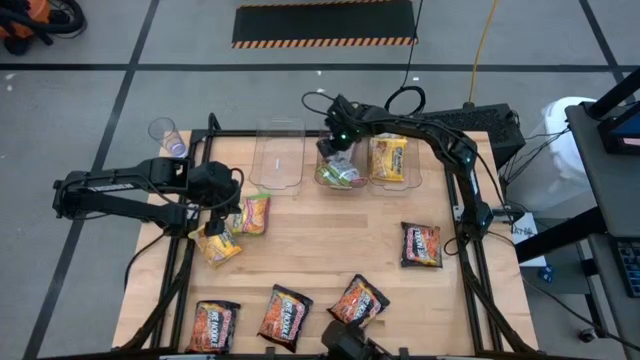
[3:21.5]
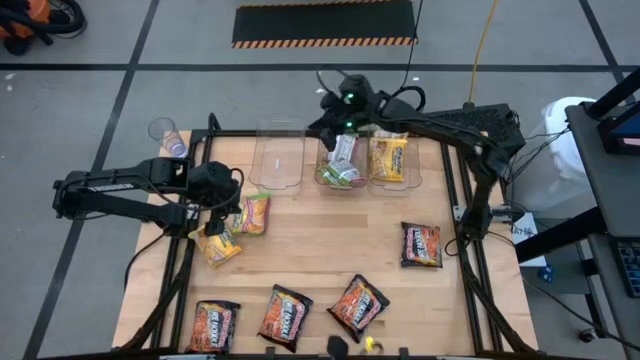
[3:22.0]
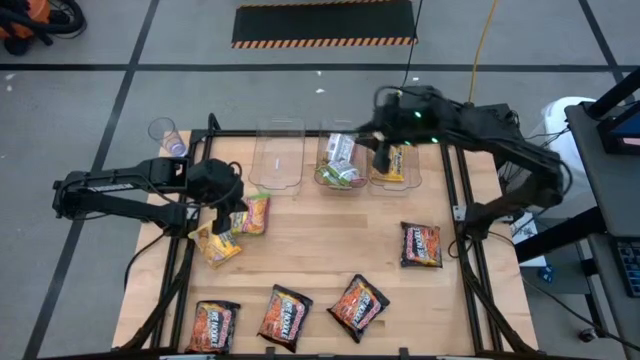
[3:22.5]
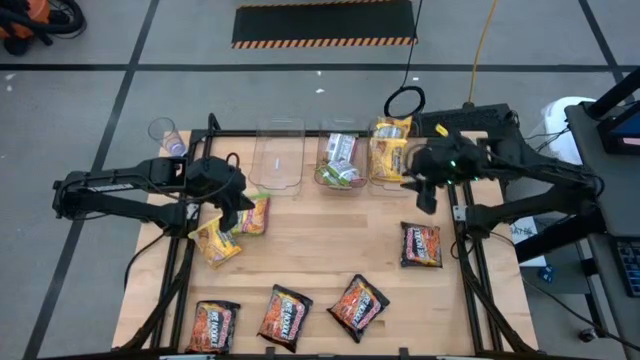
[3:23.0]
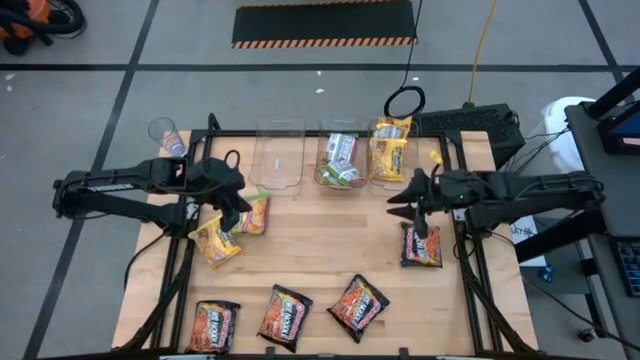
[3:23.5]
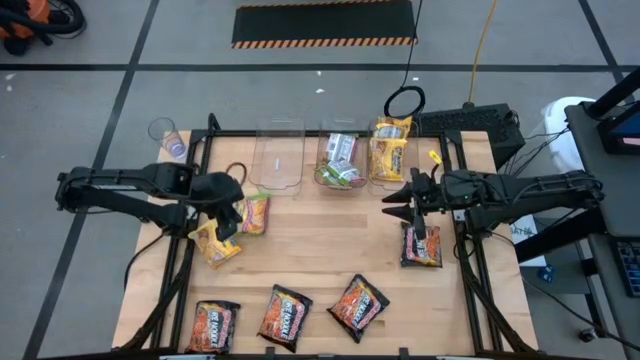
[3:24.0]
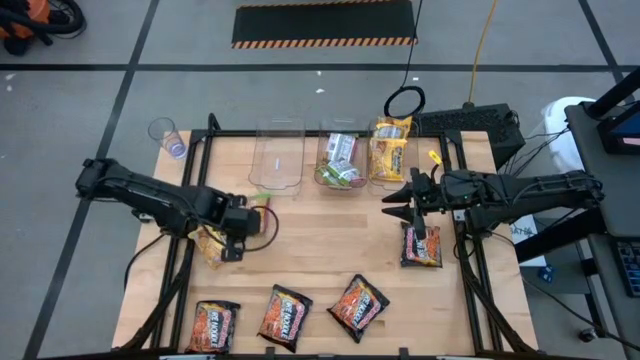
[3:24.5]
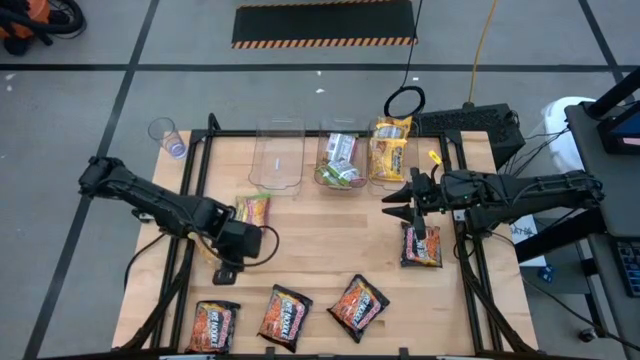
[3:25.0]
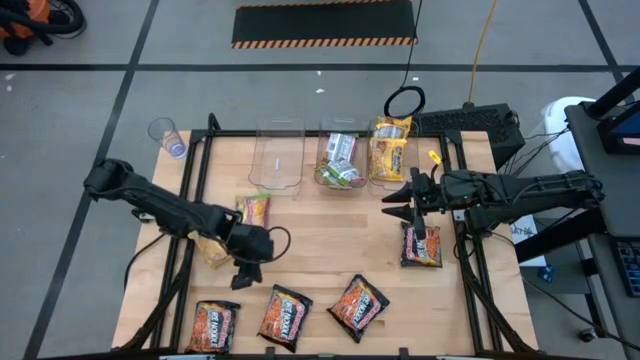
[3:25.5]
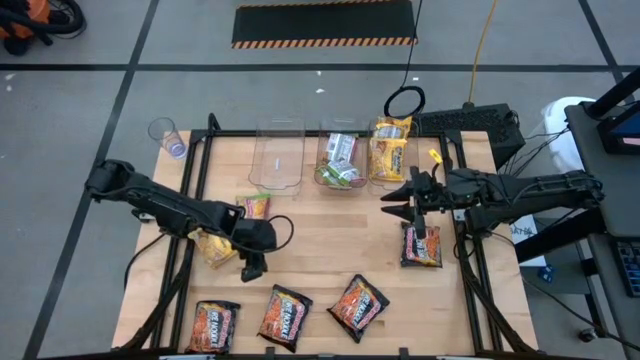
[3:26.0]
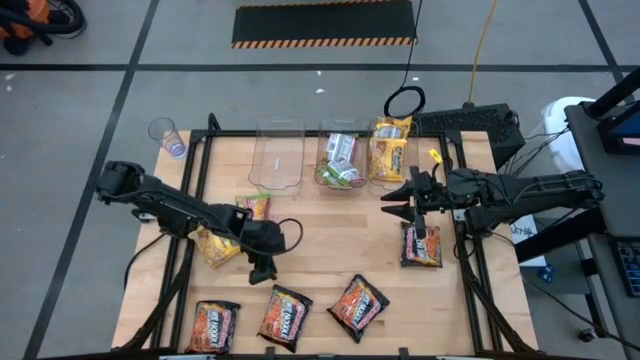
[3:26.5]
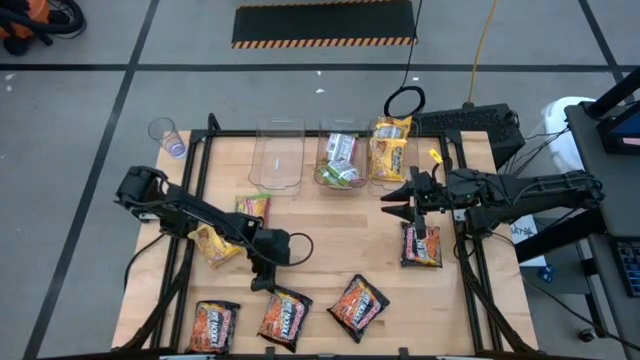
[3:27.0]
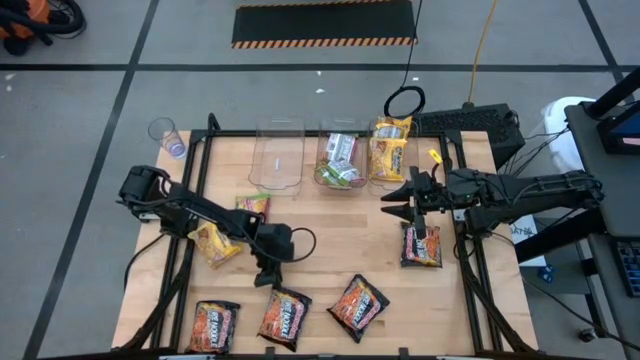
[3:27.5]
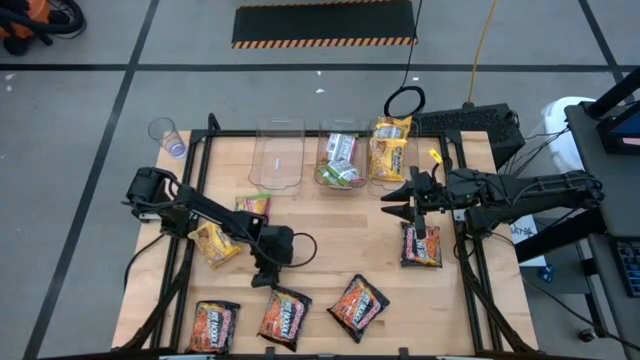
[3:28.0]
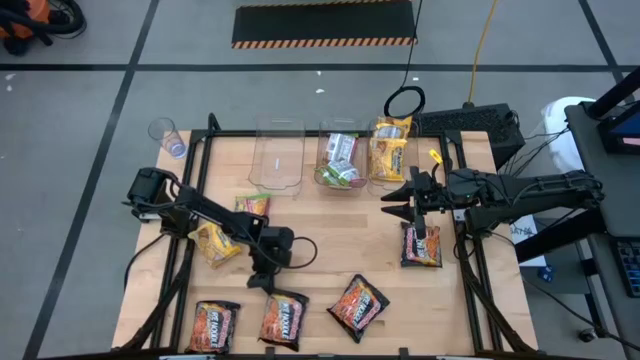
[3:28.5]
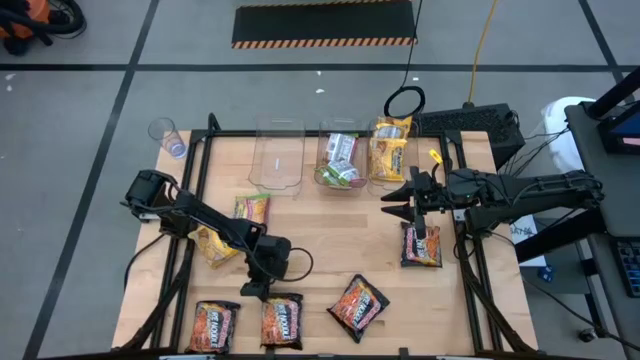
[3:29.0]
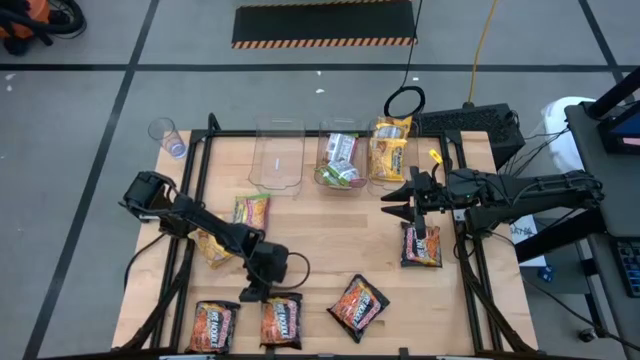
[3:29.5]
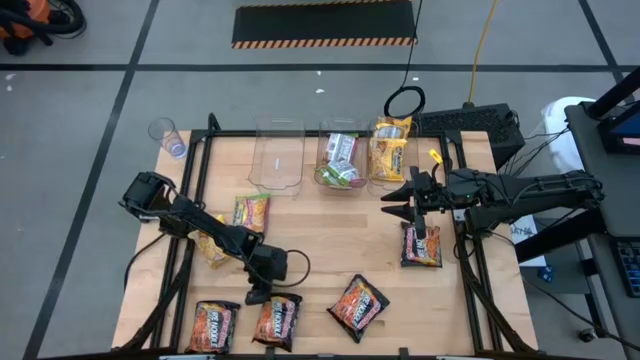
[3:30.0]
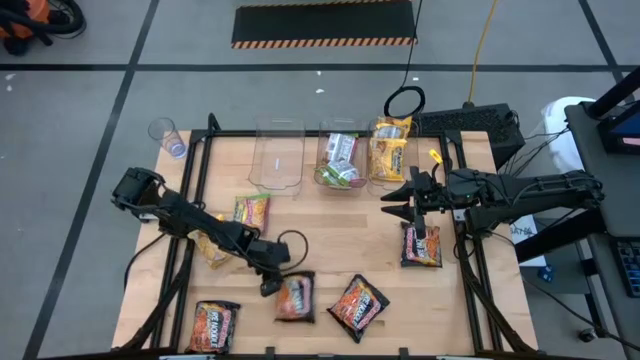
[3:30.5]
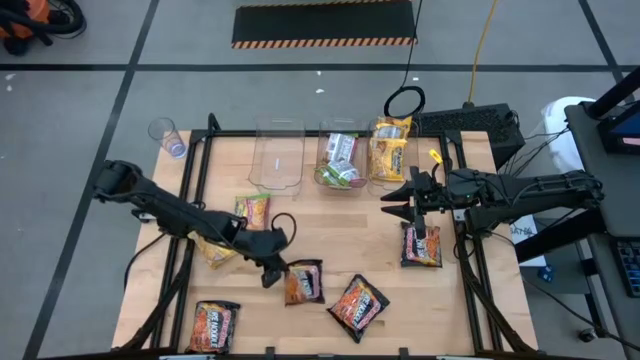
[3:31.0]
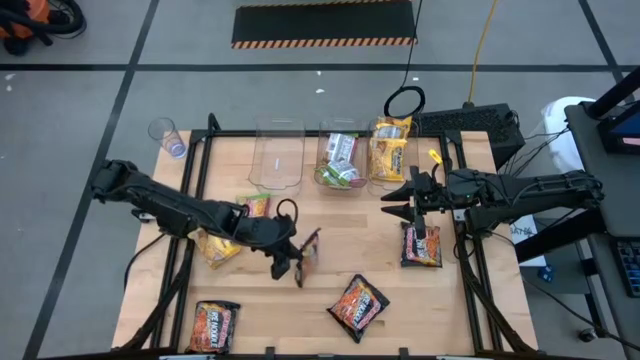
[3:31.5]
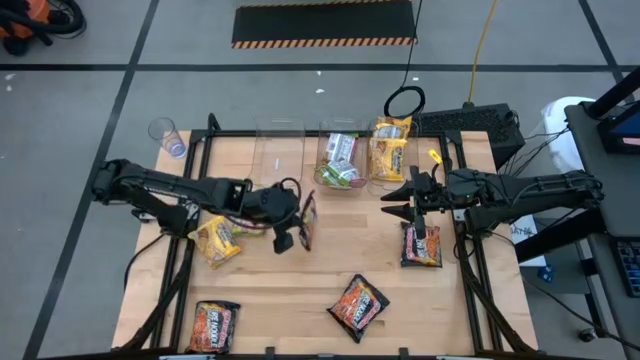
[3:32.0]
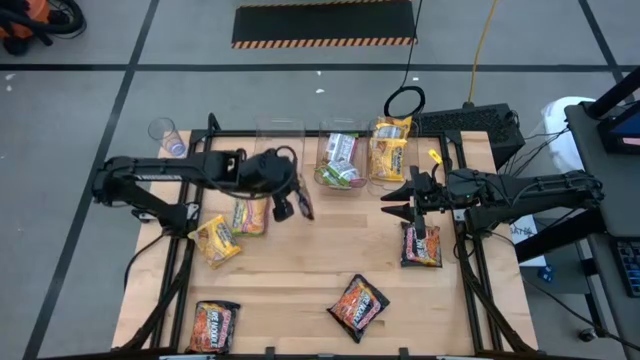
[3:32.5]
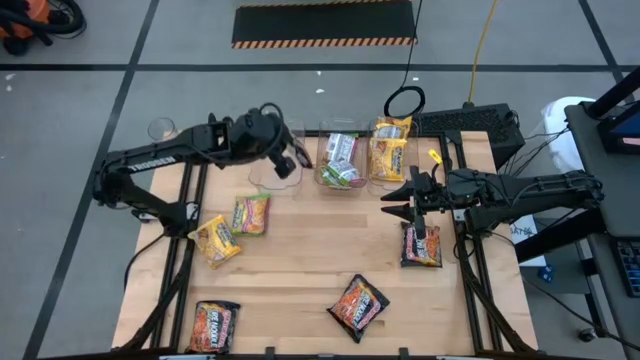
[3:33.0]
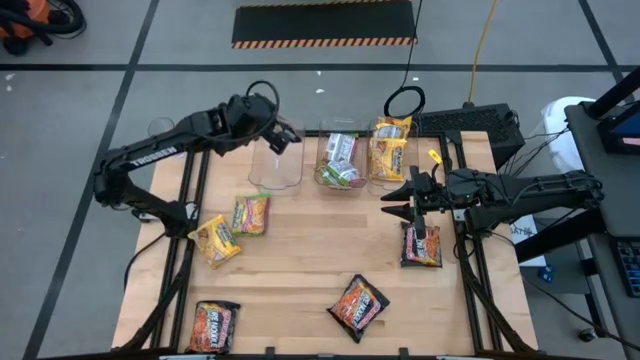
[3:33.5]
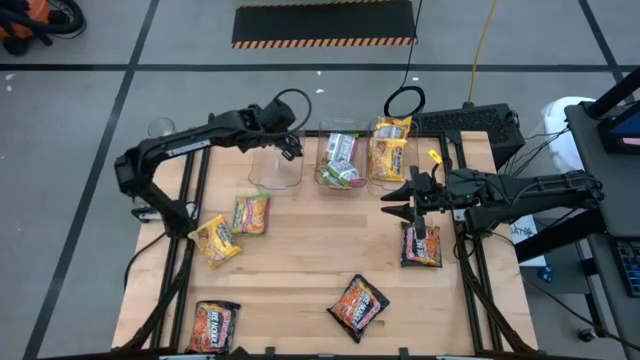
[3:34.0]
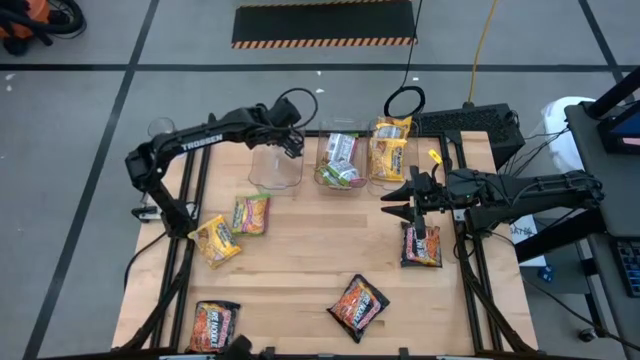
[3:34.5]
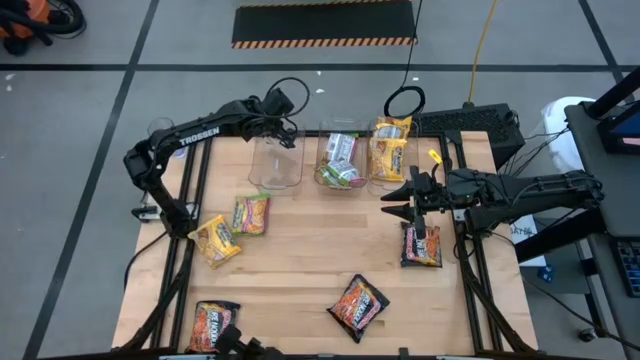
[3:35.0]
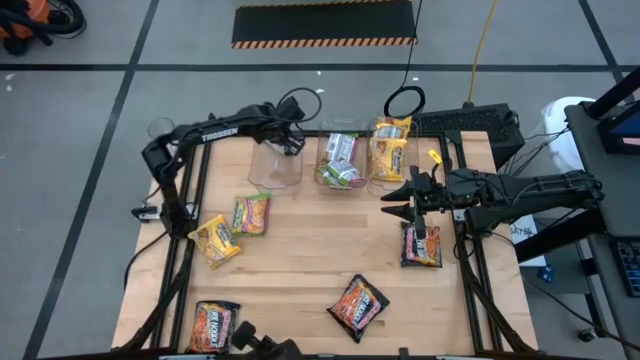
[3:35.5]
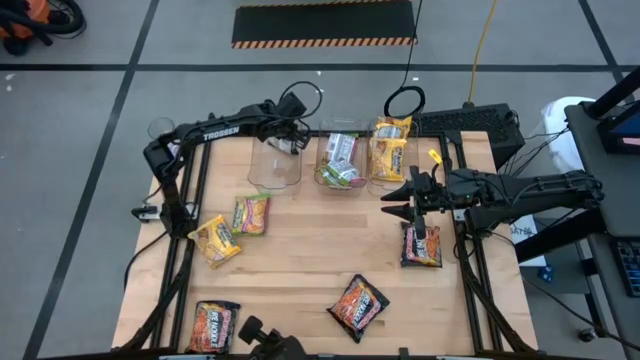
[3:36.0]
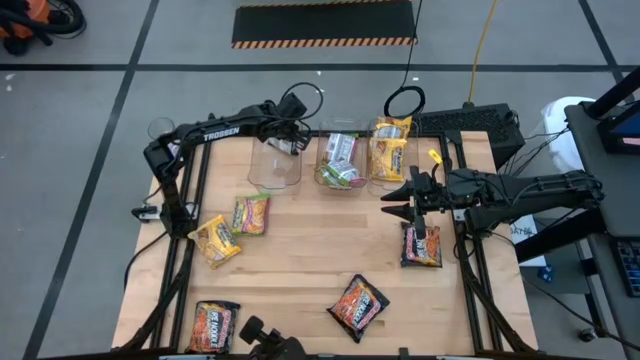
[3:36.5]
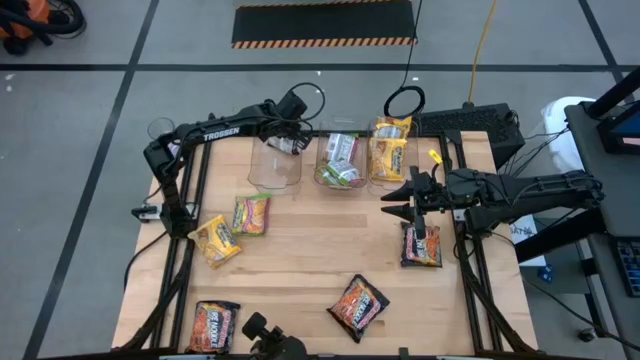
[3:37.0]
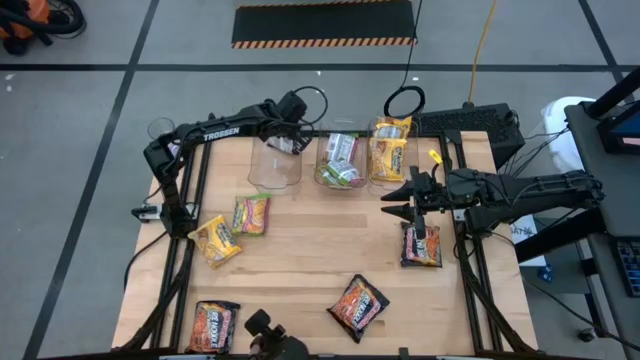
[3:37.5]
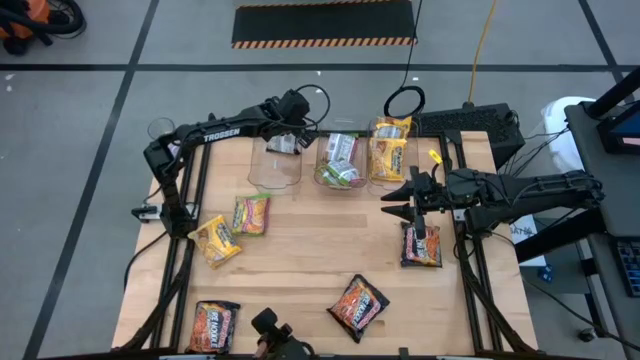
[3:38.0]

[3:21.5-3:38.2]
Task: Sort Maruchan noodles
Put the black noodle pack into the left transparent bin

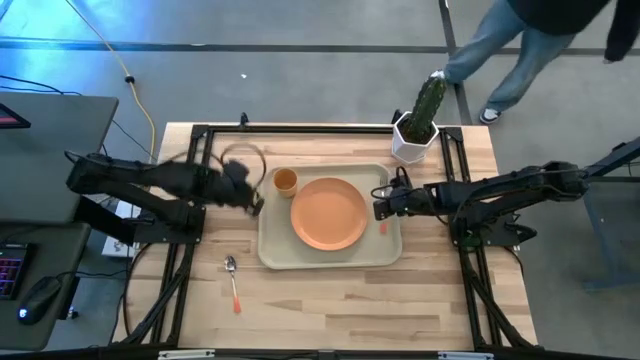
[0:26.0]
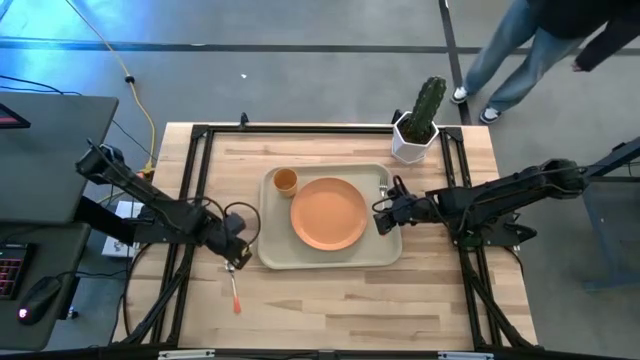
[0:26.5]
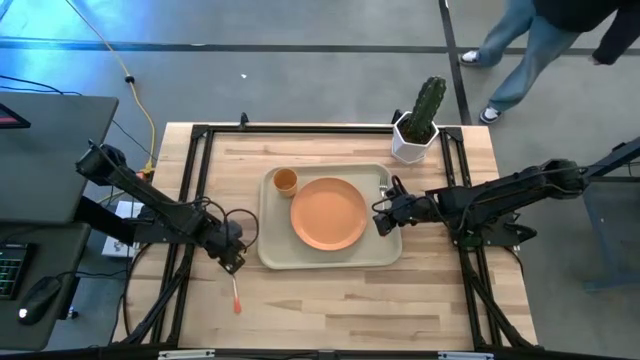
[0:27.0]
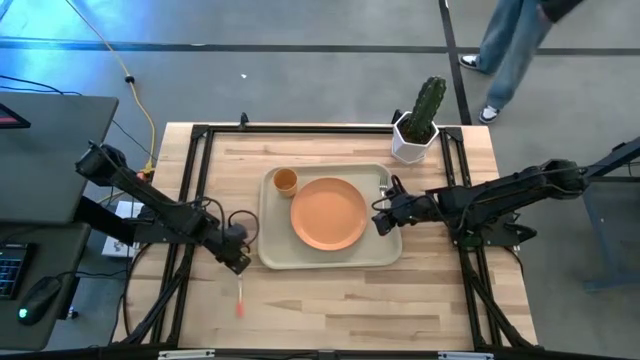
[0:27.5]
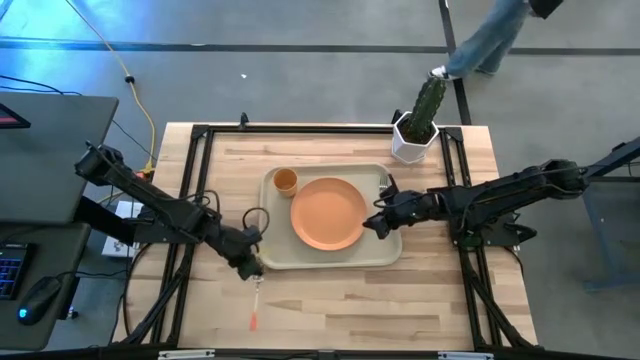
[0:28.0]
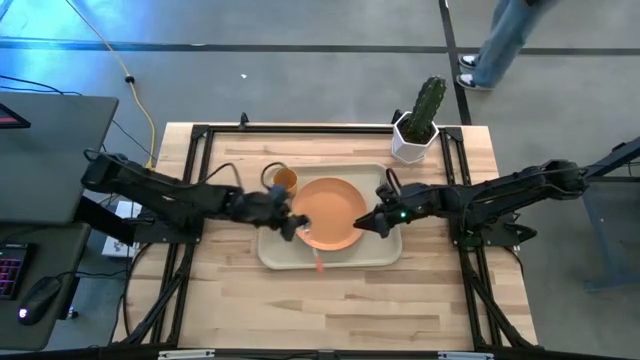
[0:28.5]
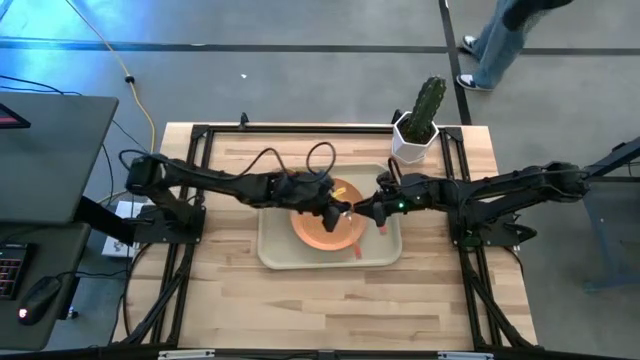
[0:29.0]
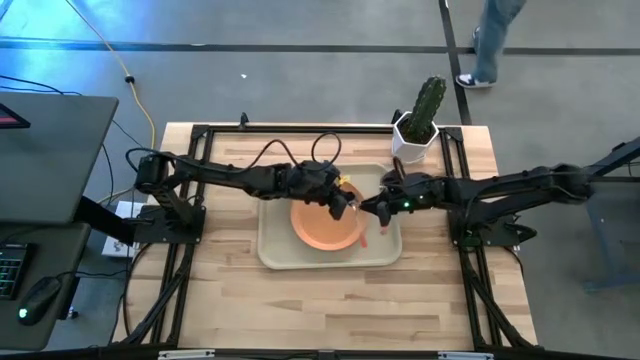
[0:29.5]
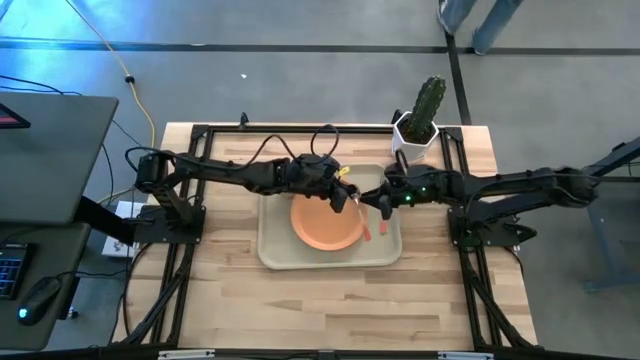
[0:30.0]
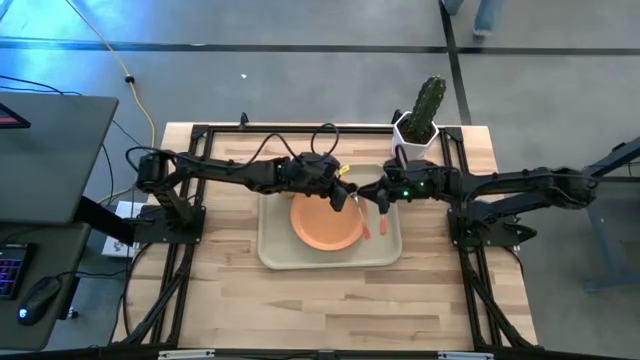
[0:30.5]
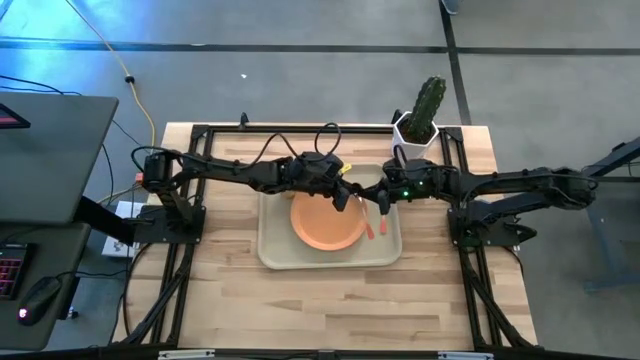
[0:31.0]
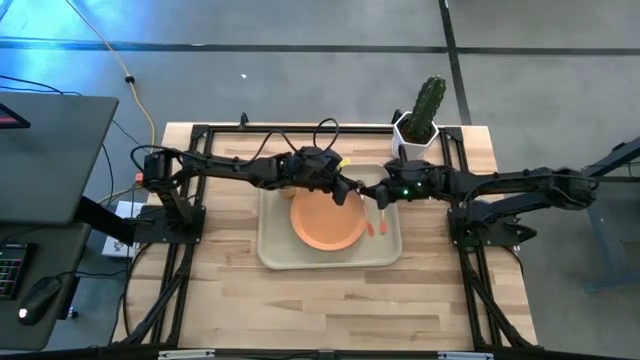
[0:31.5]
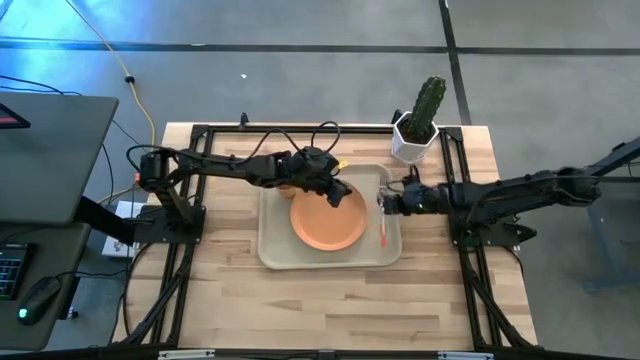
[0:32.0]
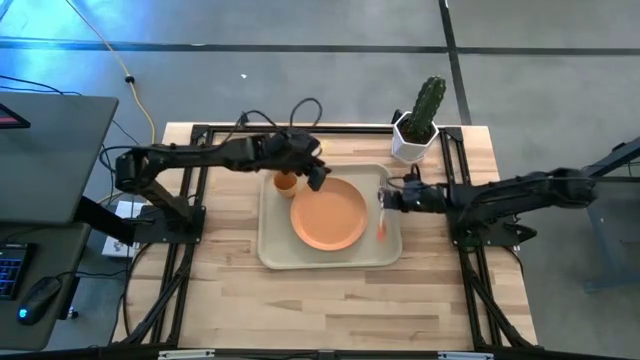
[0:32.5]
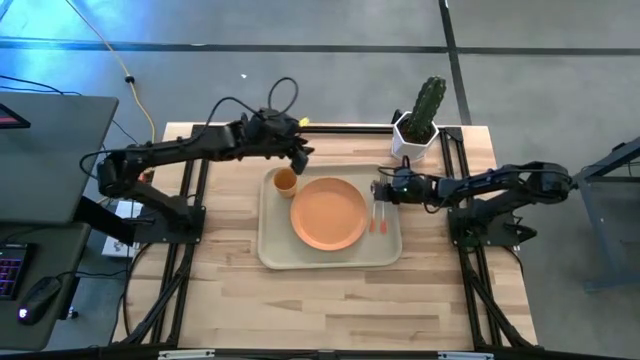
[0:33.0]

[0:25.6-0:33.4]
Task: Pick and place plate/cup/fork/spoon on tray
Put the orange spoon on the off white tray on the left side of the orange plate
